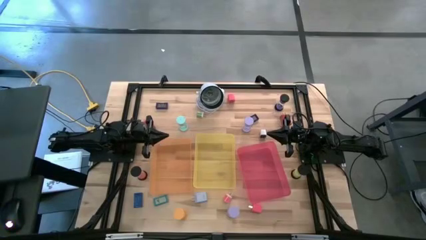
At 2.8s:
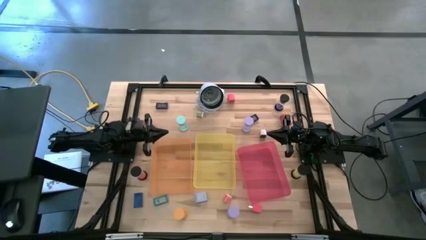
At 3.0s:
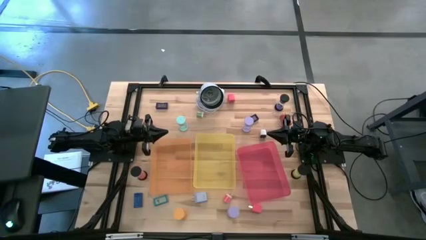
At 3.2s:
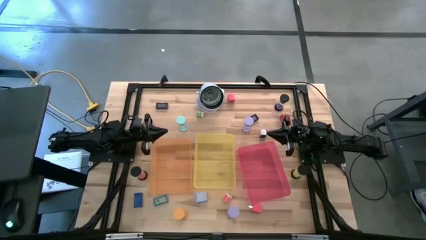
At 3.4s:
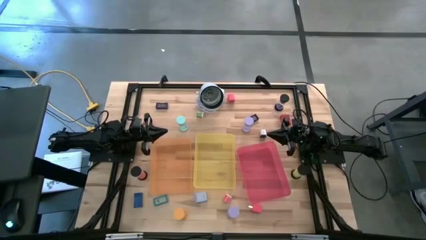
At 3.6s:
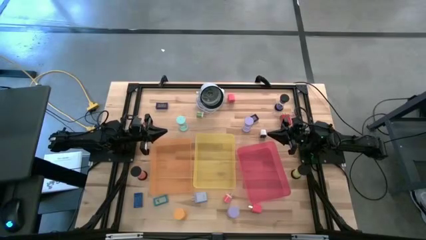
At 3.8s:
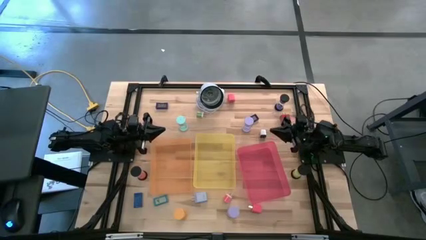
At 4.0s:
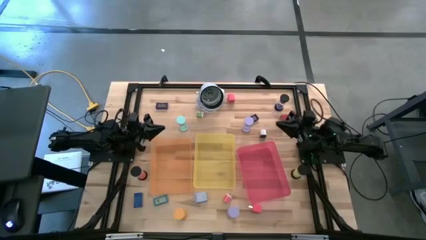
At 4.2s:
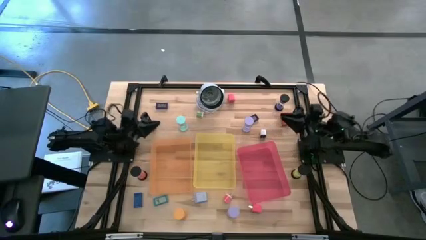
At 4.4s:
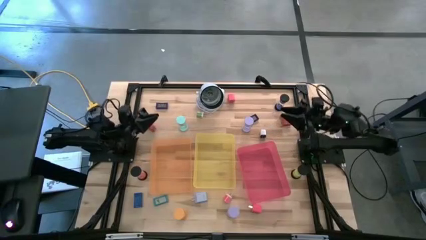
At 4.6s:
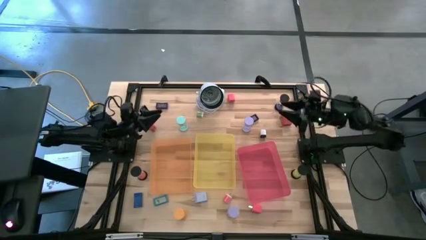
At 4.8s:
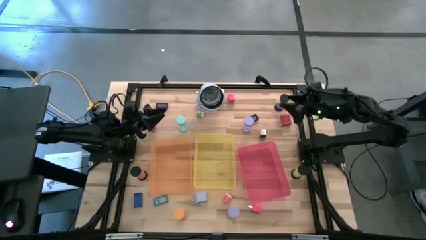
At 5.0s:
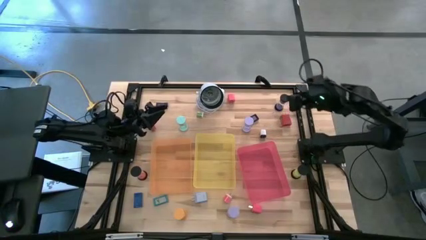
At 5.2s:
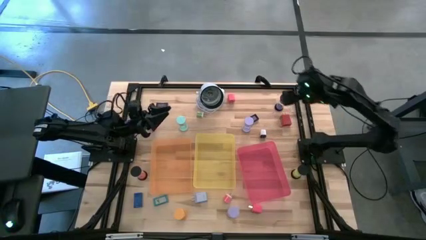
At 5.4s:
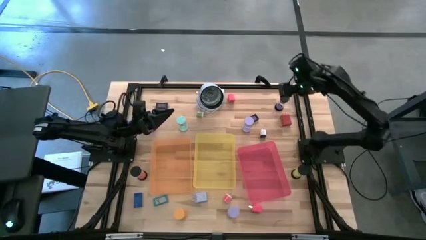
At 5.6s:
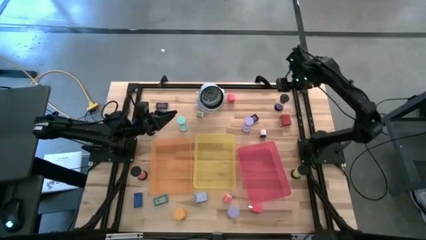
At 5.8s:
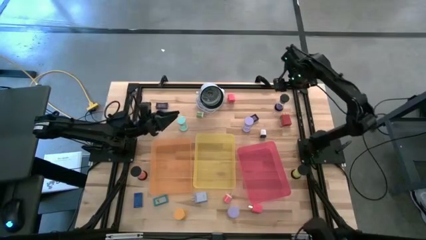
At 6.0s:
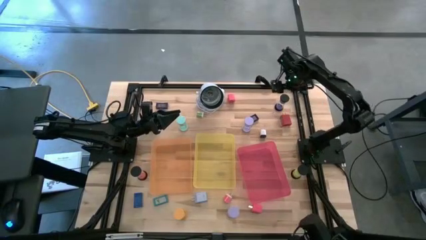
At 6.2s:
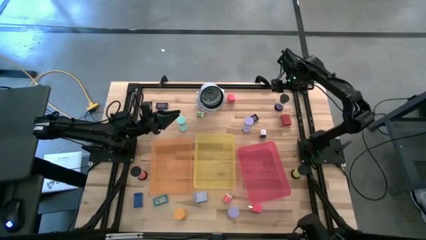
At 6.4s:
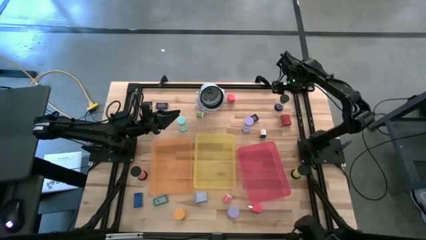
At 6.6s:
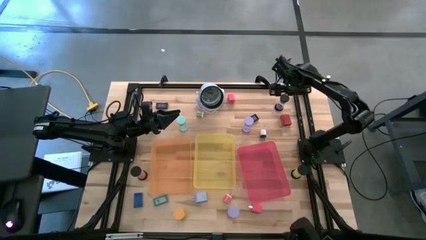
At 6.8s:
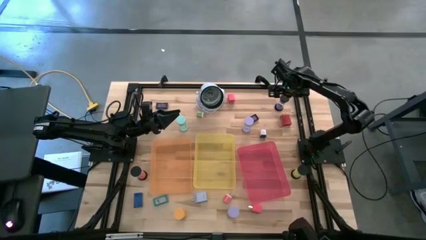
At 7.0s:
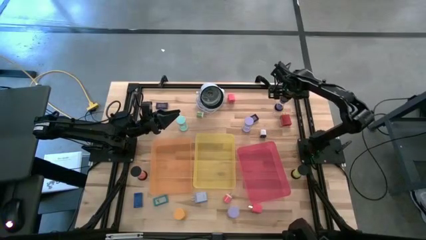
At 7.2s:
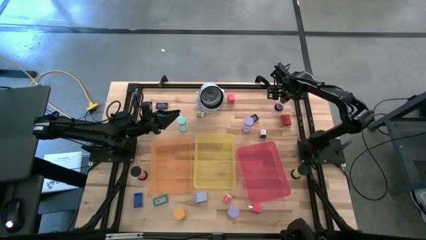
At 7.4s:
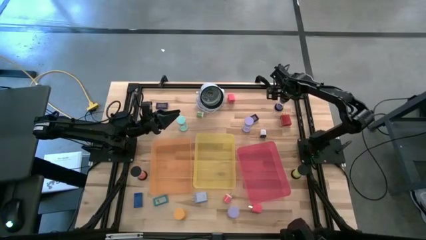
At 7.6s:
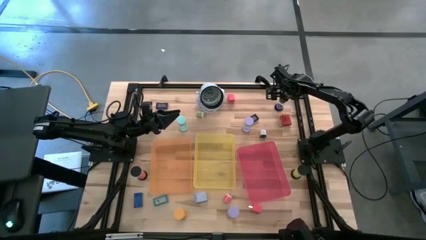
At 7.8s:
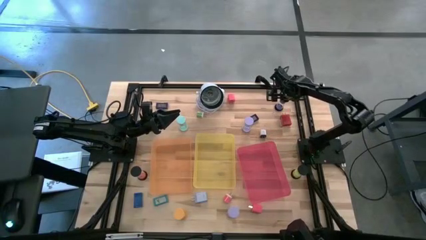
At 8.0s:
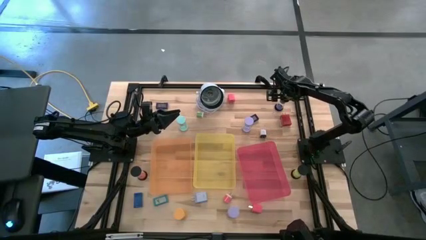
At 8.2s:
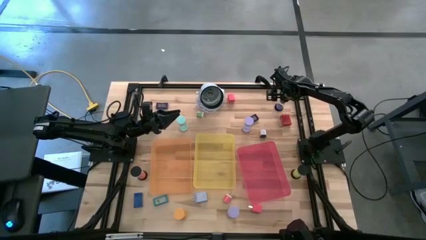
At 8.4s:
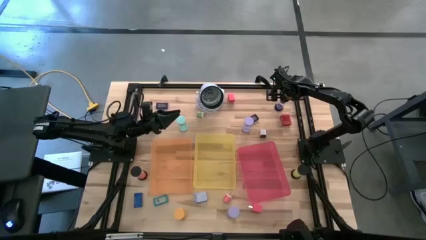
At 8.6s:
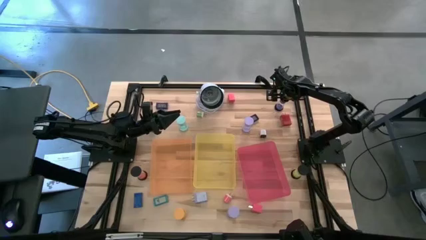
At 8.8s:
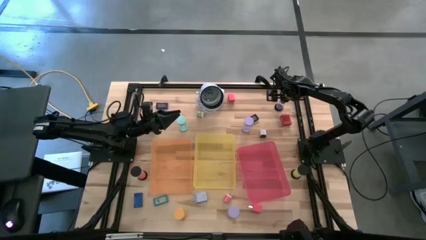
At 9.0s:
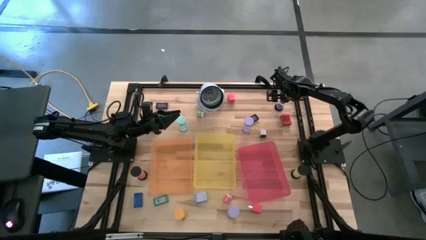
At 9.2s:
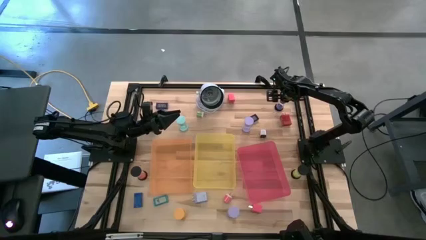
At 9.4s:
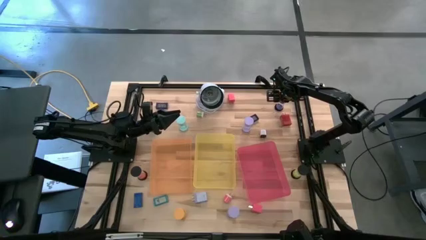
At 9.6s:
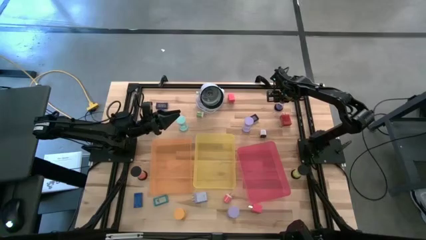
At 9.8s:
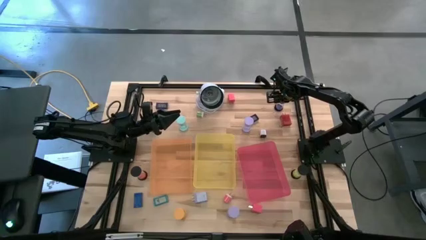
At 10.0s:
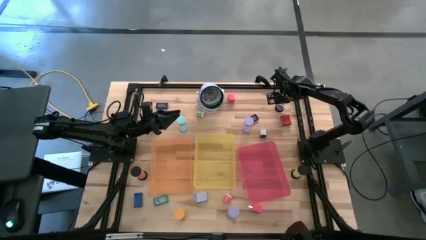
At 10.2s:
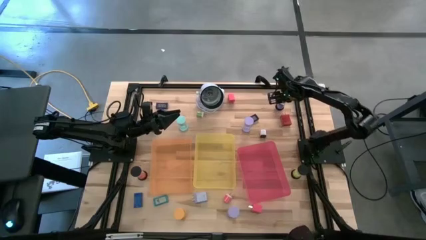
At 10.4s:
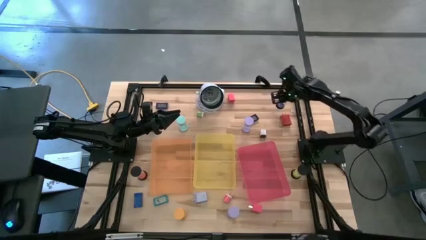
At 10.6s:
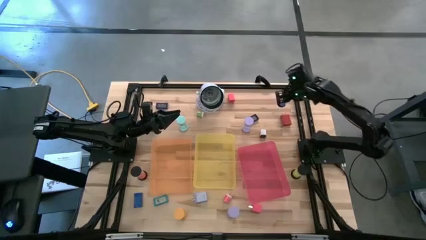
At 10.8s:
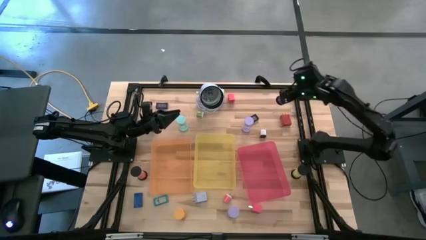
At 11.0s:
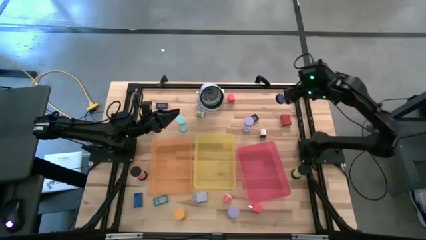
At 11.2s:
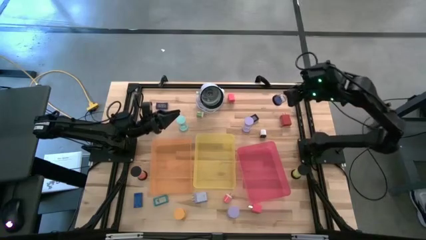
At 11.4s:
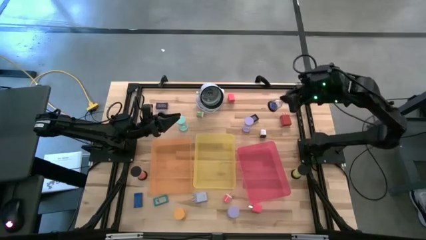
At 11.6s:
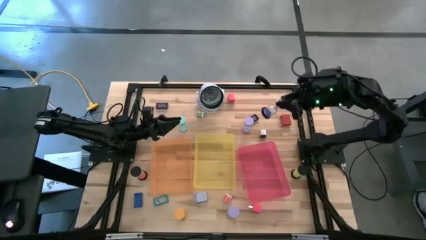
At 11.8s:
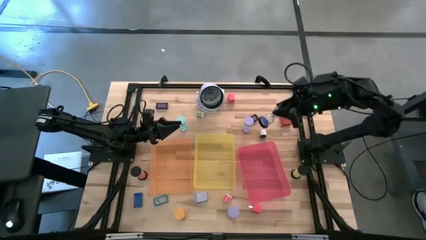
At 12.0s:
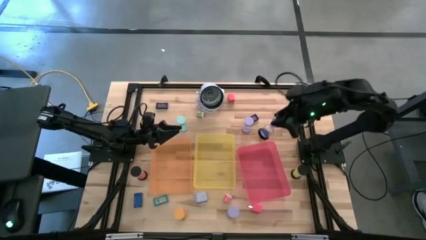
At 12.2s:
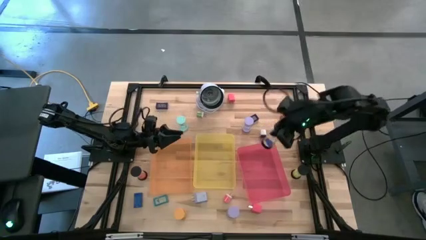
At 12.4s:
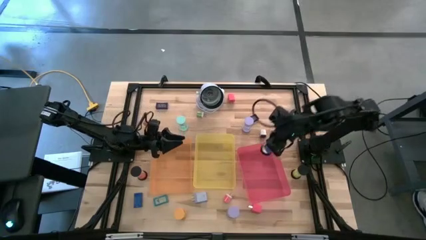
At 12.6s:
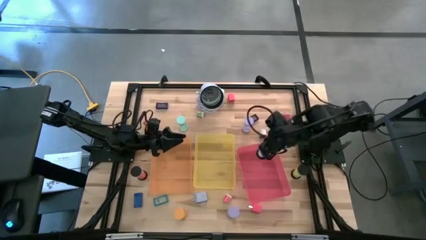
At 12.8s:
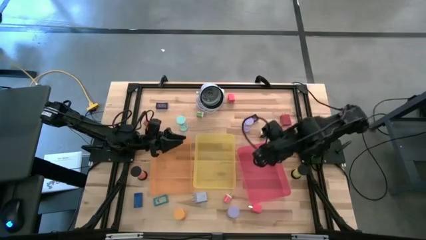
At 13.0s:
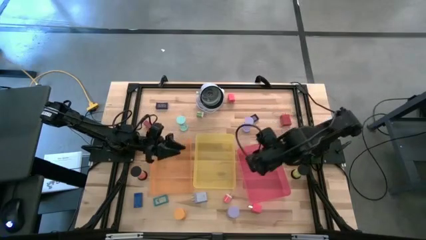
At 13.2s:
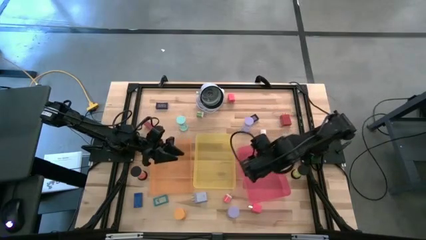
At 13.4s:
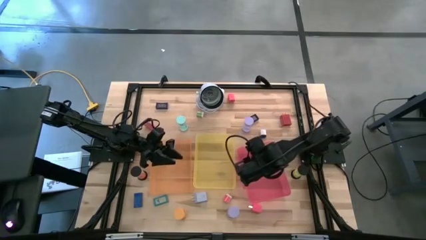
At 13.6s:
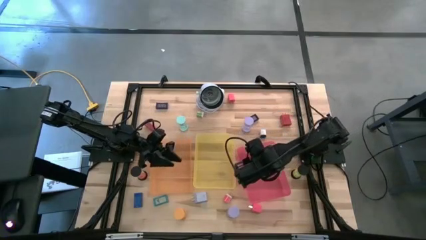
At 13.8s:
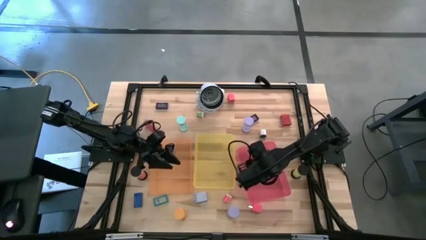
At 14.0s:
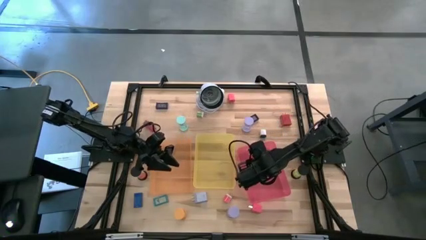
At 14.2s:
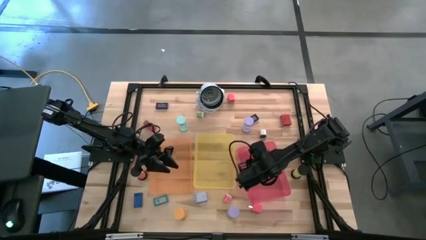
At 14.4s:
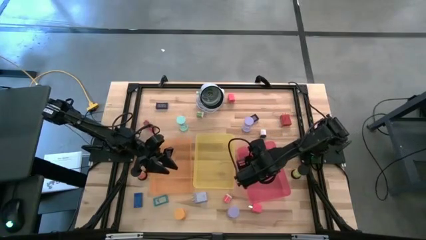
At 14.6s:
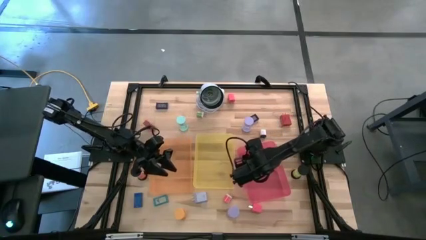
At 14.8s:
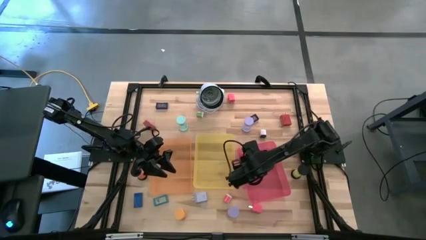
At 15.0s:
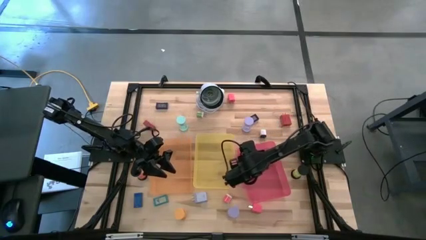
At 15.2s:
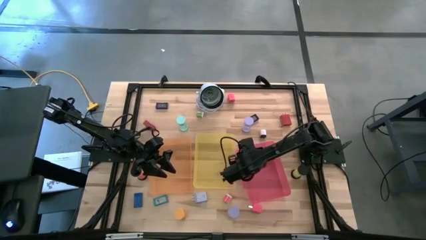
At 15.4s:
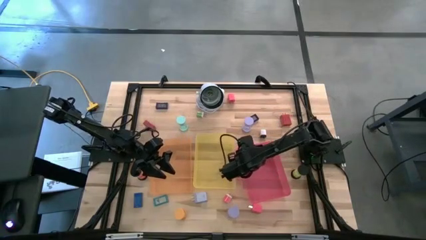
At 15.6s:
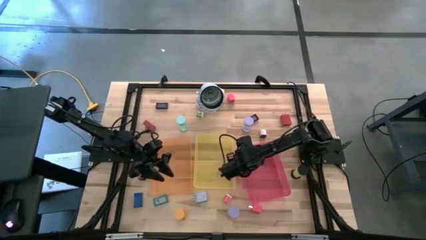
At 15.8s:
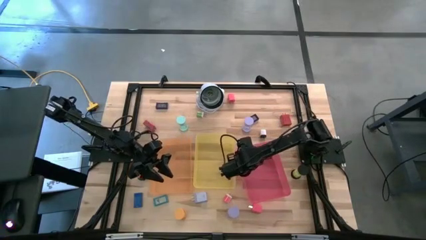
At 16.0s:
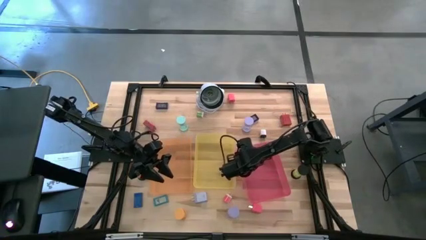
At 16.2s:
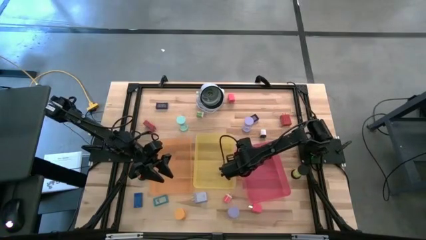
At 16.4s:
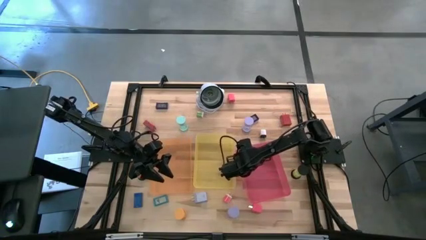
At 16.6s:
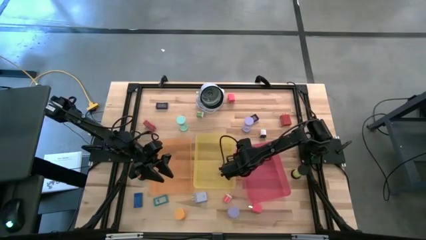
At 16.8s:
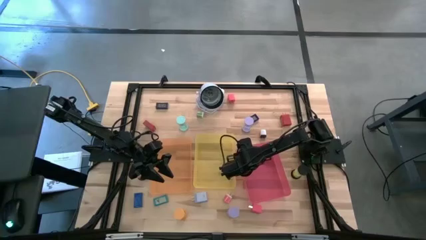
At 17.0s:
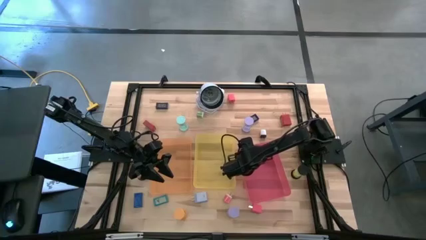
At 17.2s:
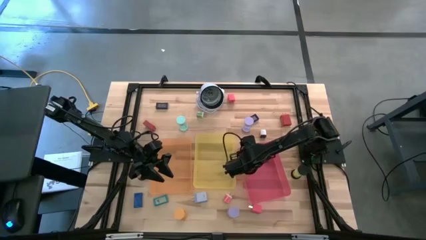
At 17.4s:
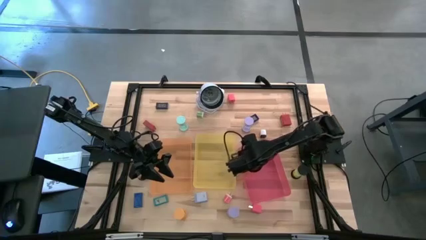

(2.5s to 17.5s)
Task: Pick & Place Office items
Put the black hourglass timer into the red bin
